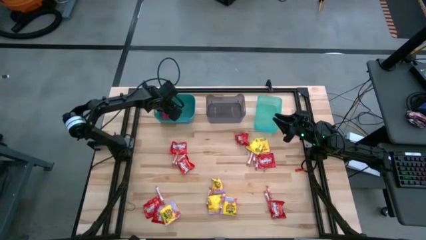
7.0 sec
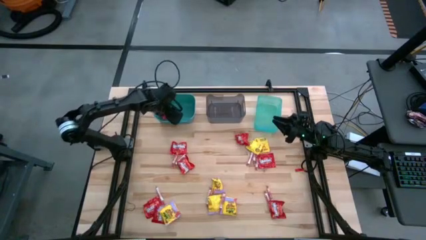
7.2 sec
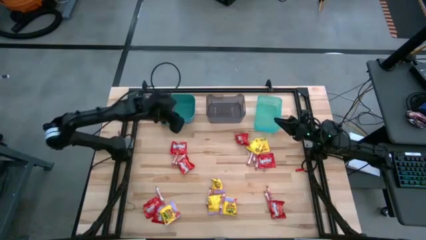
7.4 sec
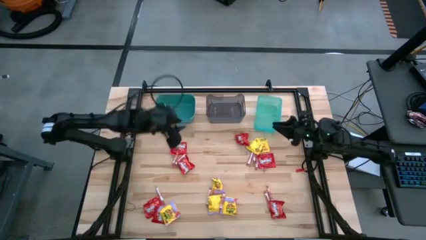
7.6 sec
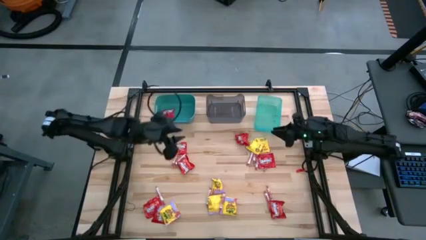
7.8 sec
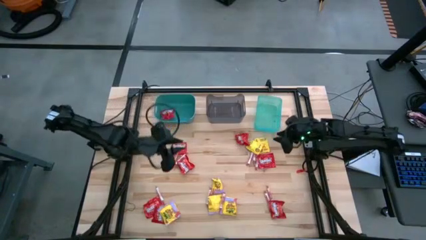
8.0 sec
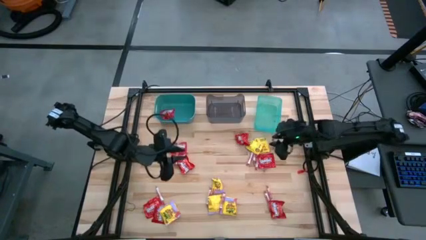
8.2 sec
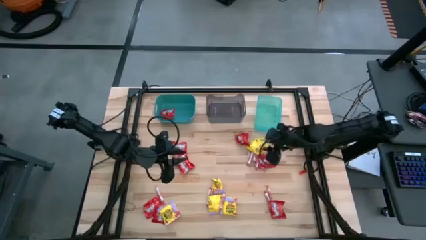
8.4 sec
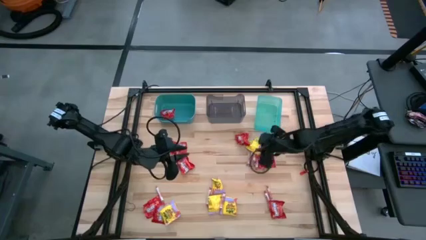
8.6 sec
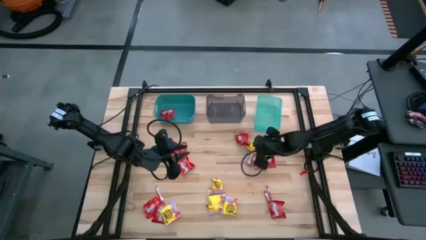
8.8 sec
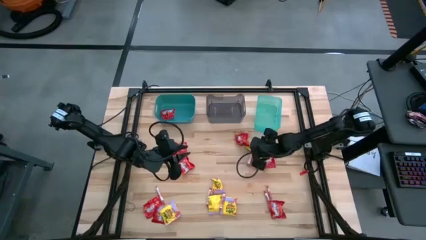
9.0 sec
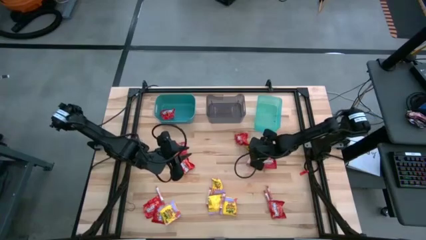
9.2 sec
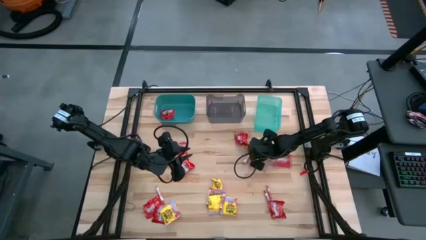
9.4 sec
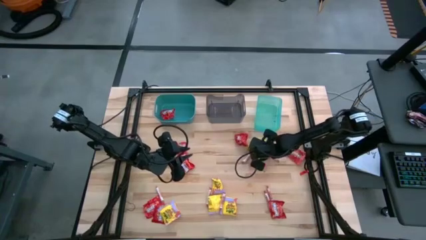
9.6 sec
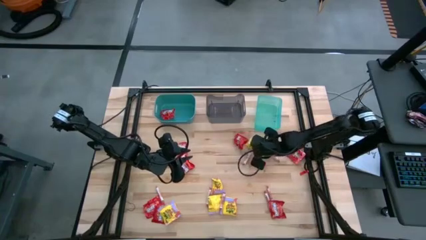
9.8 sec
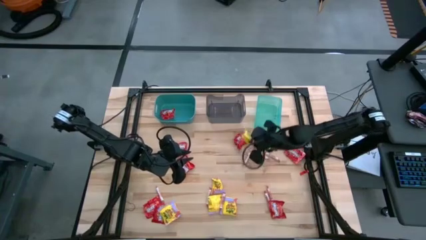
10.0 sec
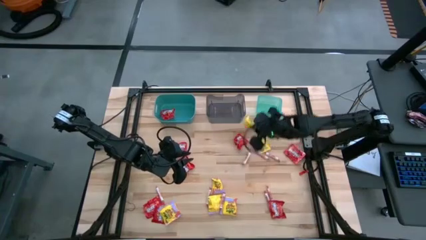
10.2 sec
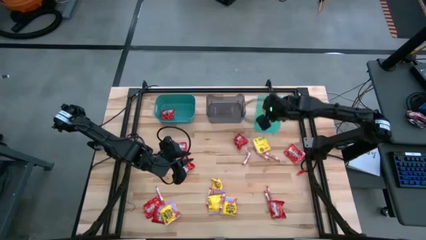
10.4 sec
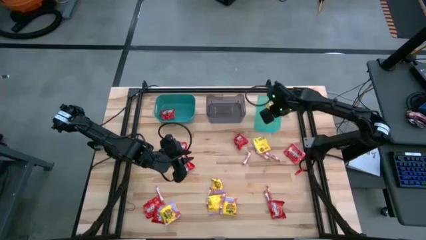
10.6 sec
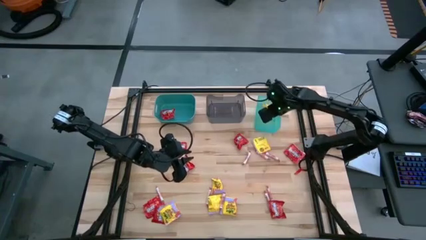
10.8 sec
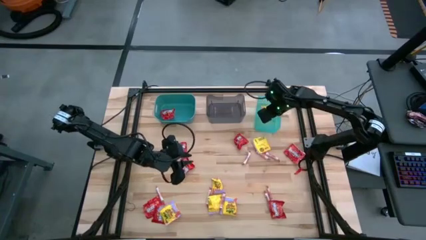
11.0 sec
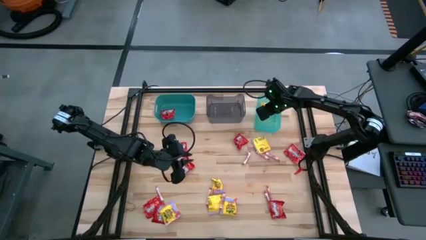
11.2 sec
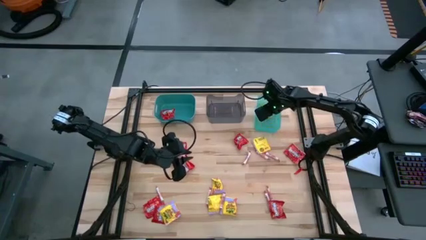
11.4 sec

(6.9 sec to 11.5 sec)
Task: Sort candy
Put the yellow candy into the light green bin

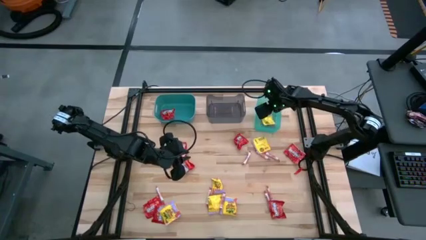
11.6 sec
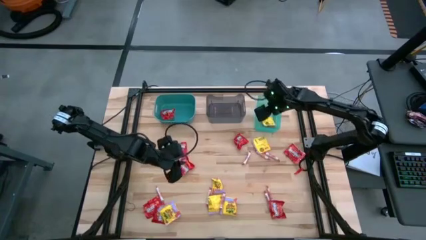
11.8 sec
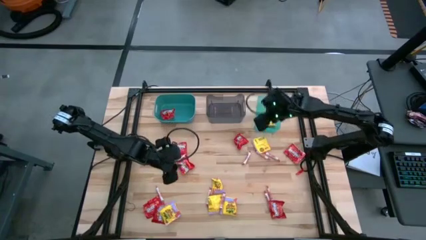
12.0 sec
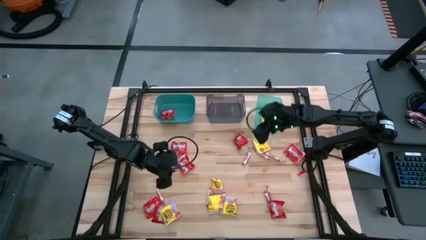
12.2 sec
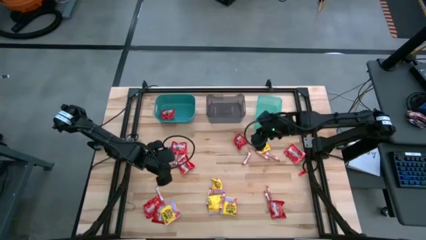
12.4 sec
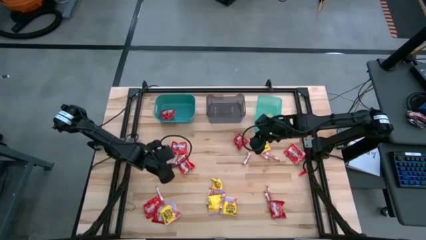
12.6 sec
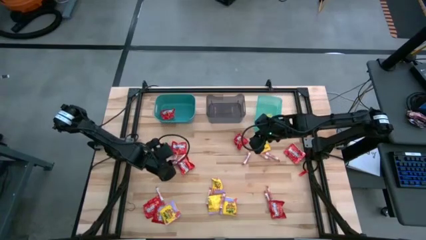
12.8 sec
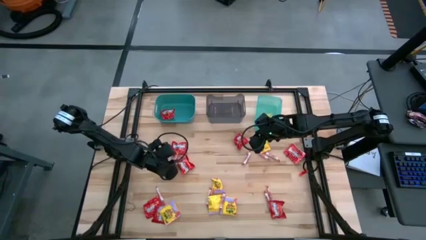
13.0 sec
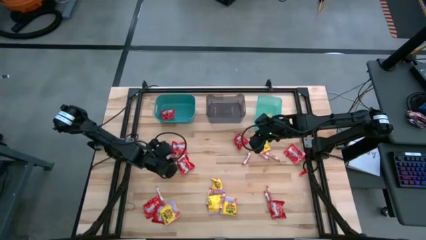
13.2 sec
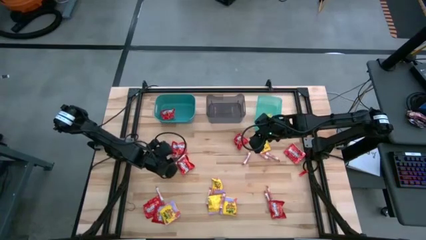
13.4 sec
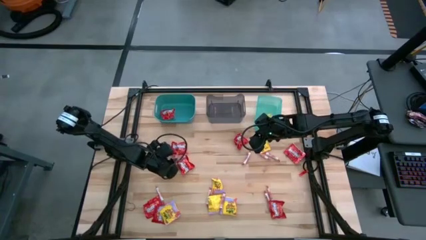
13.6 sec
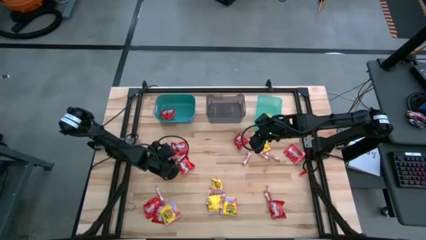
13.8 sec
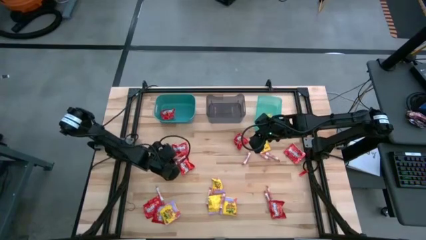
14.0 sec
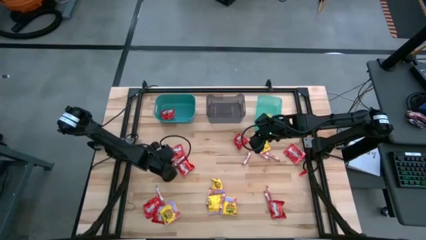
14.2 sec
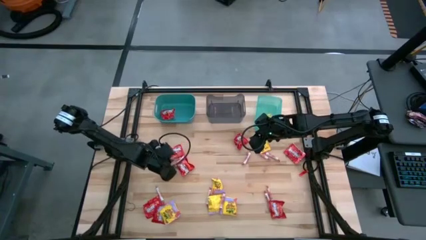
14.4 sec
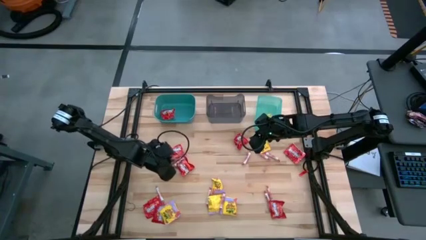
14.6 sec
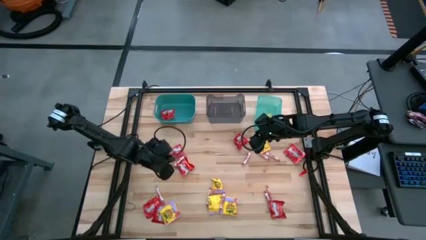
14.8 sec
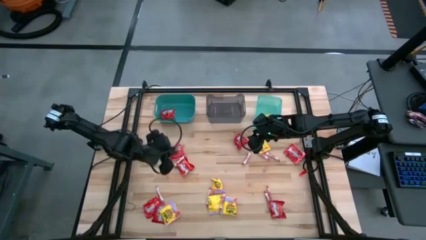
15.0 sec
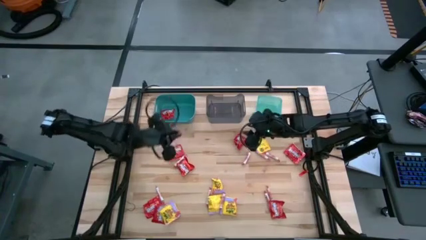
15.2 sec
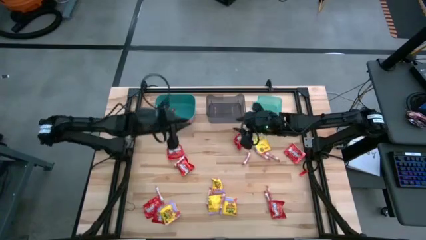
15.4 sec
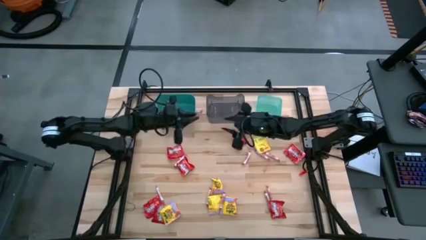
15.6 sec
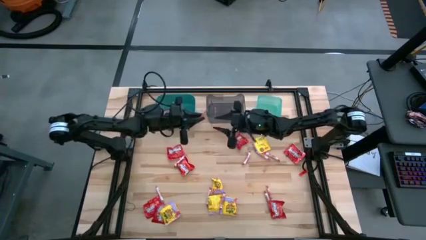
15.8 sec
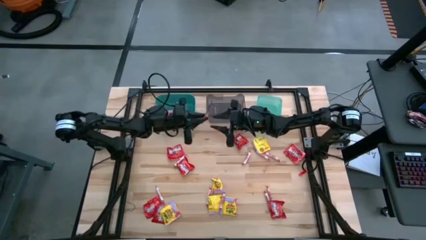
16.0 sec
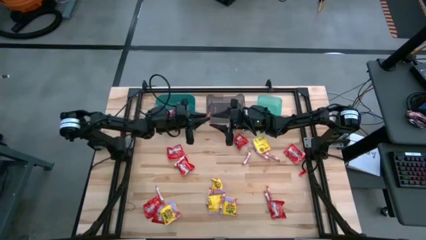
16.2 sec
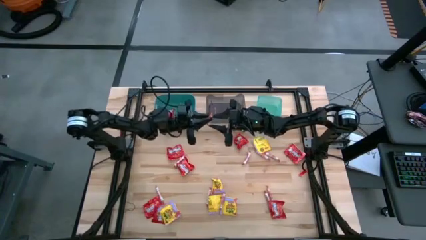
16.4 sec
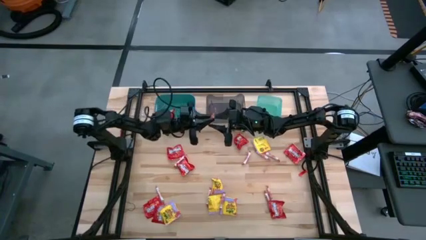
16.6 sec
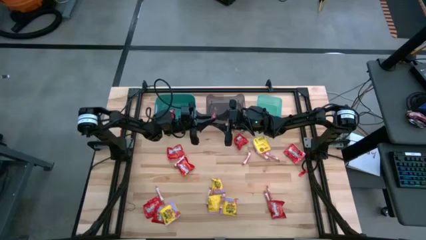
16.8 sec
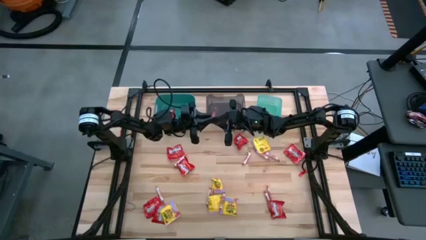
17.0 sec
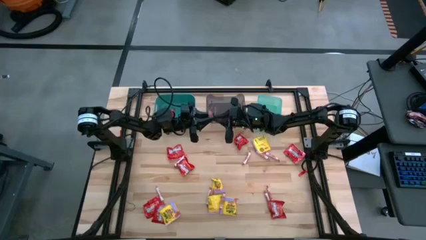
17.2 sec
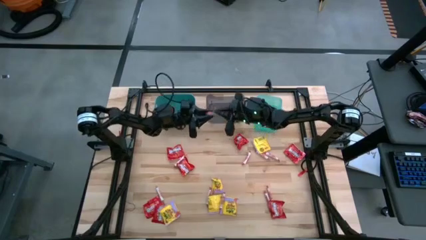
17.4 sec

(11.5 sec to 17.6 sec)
Put the white candy into the black bin

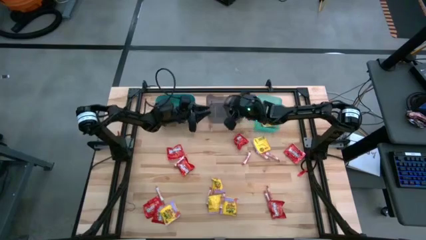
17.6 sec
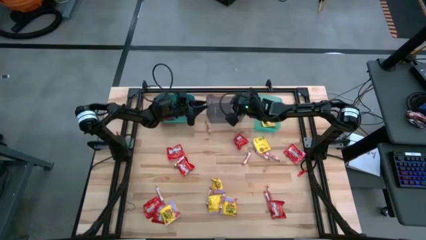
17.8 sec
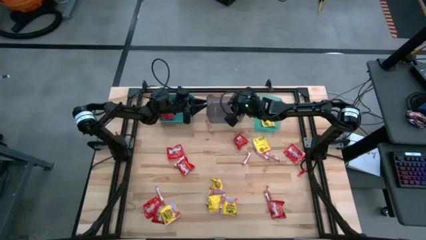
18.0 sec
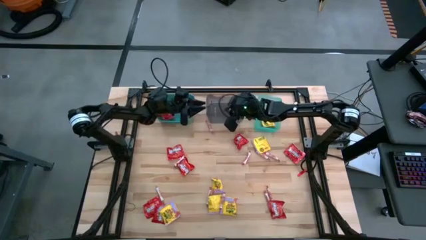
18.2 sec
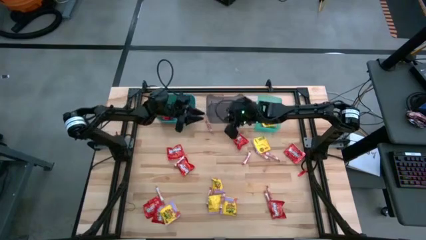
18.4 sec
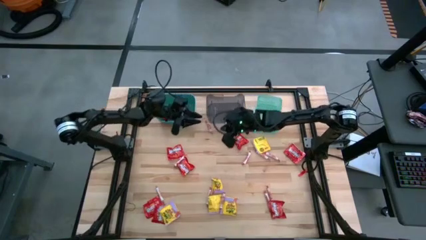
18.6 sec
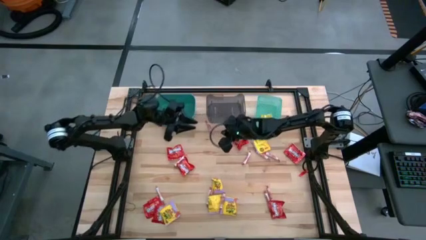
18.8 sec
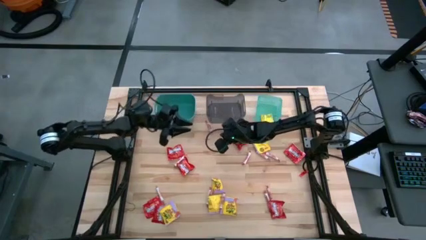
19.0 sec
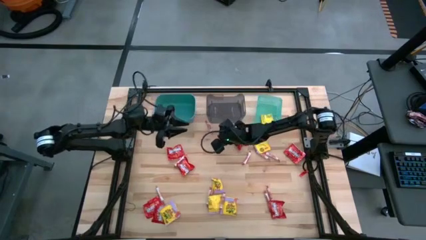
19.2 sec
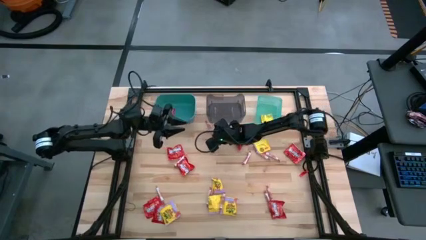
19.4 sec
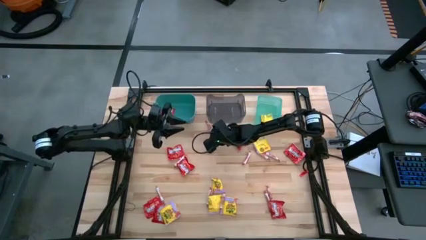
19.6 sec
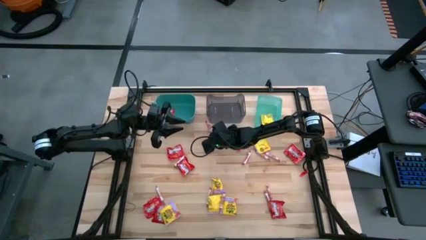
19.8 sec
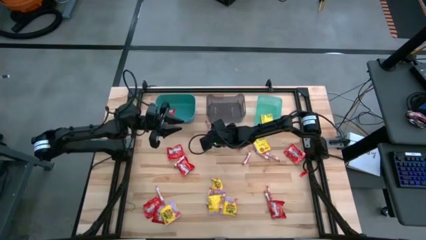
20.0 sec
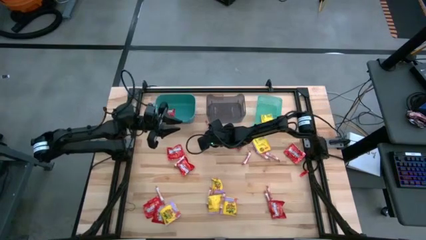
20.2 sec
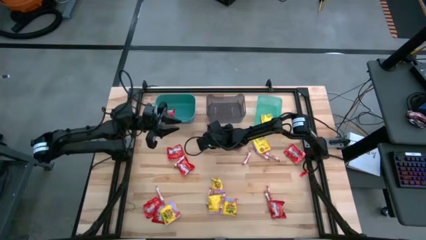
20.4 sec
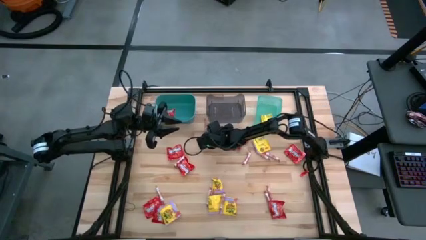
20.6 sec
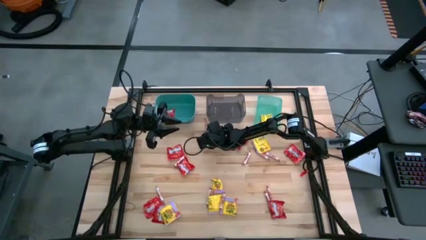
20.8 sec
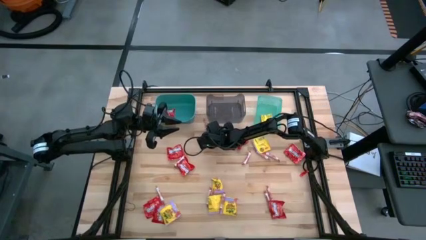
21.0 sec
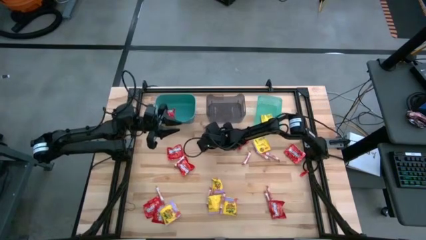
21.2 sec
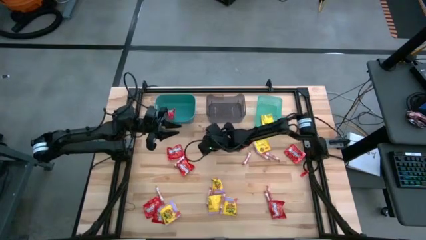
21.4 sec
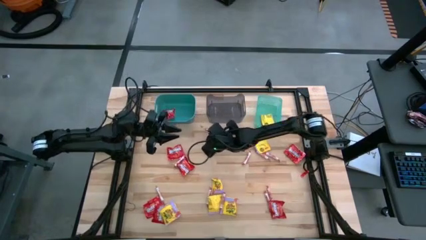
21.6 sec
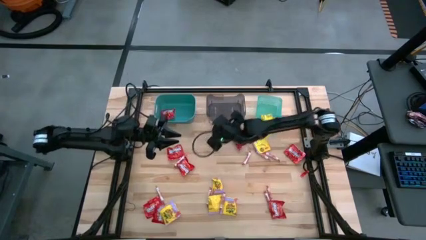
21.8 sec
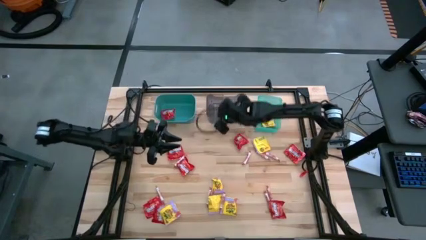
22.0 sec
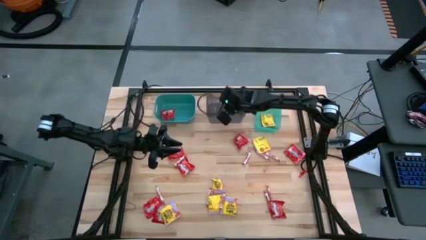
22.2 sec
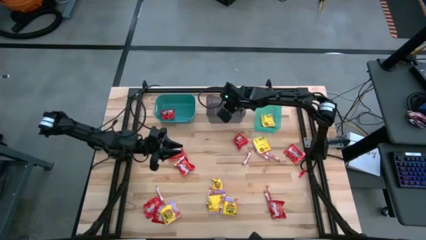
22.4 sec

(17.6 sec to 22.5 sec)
Put the white candy into the black bin

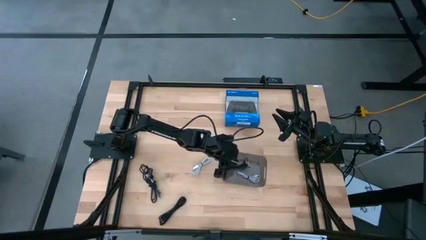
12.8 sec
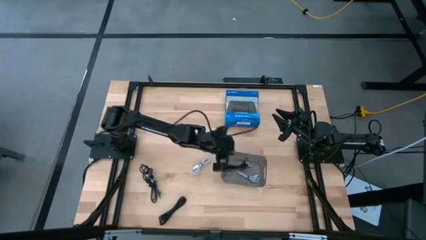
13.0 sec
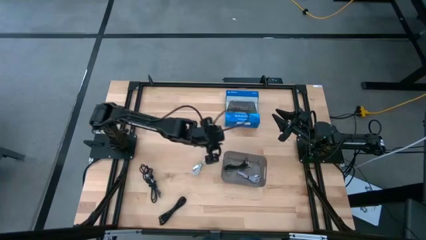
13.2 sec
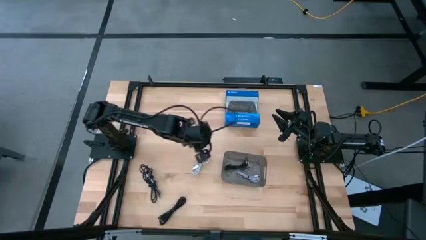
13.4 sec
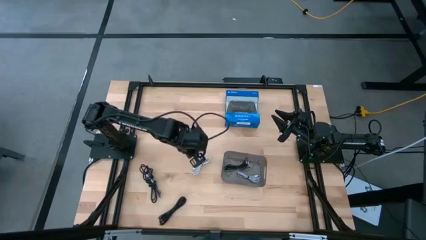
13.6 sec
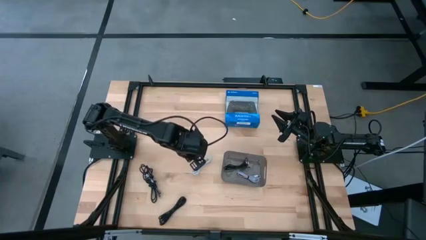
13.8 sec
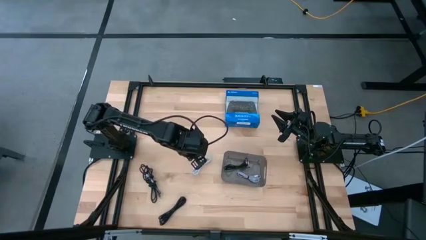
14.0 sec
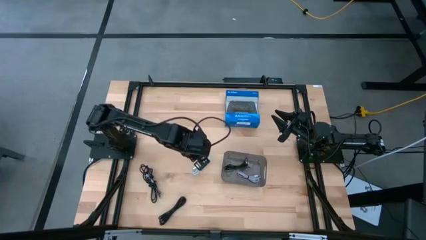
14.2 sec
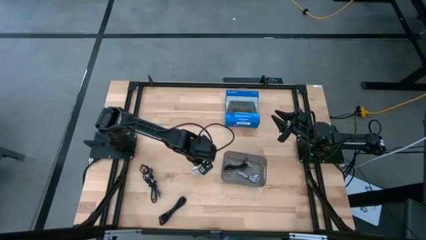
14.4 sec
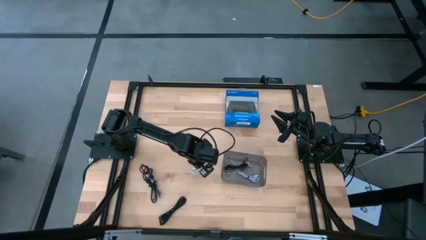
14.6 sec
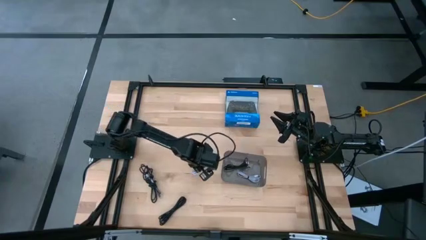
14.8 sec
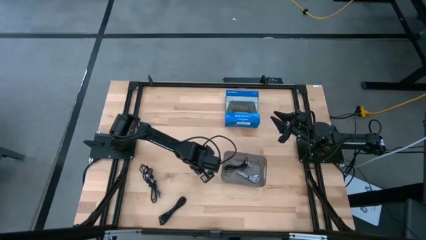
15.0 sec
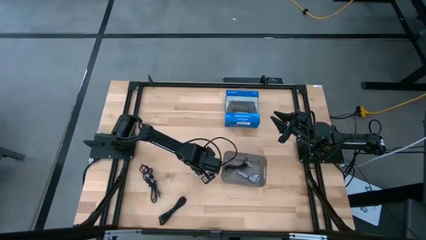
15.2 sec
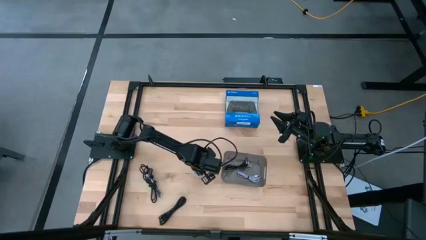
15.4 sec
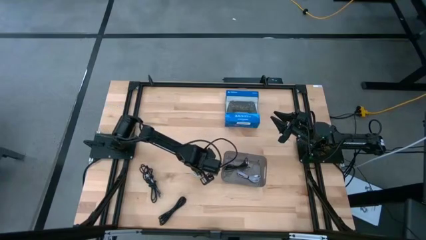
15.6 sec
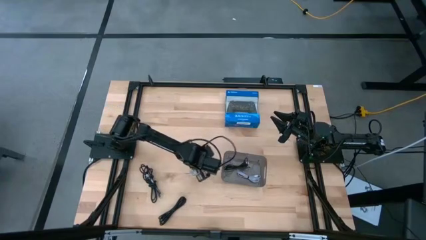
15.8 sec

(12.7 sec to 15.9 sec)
Task: Pick and place USB-C Cables
Put the white charger cable into the black bin
